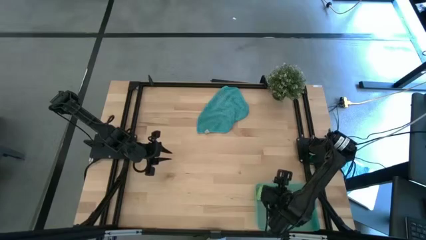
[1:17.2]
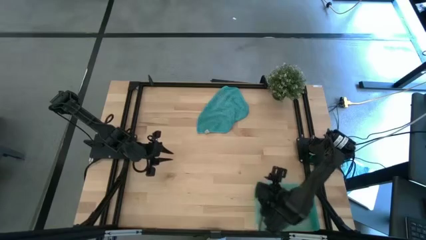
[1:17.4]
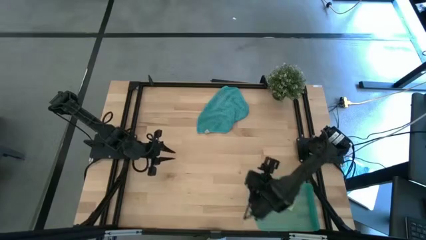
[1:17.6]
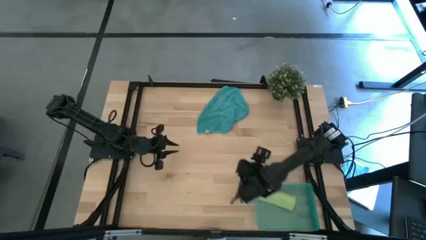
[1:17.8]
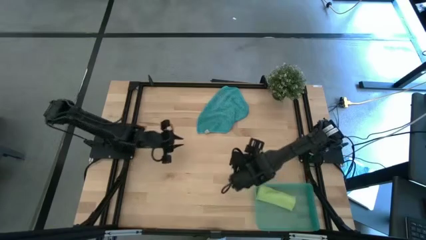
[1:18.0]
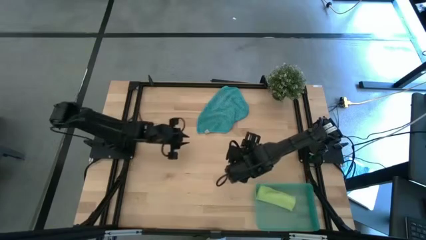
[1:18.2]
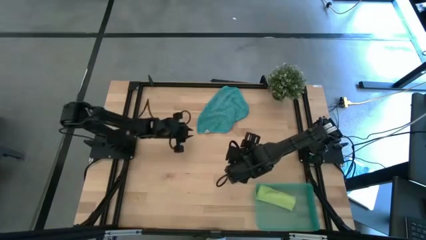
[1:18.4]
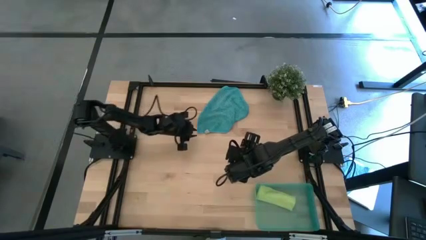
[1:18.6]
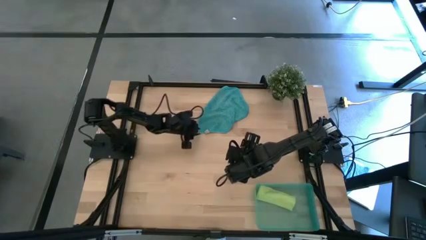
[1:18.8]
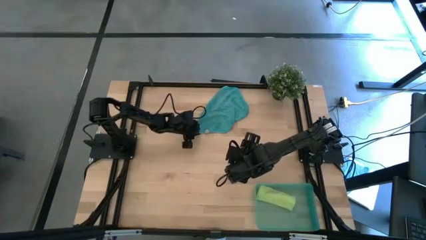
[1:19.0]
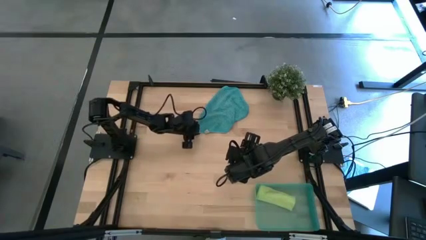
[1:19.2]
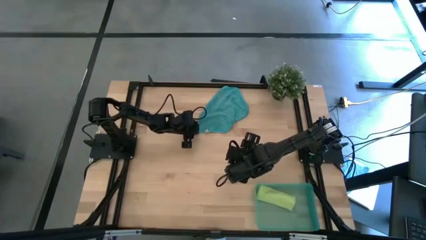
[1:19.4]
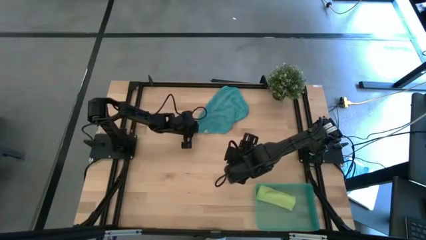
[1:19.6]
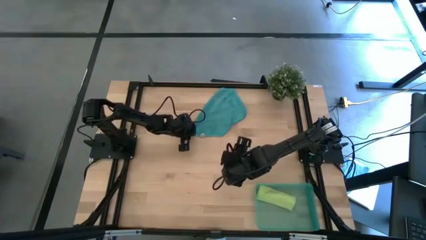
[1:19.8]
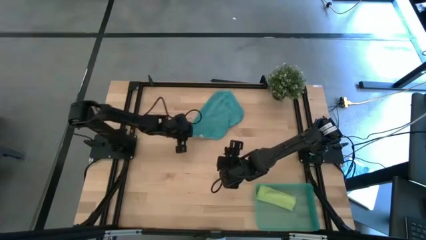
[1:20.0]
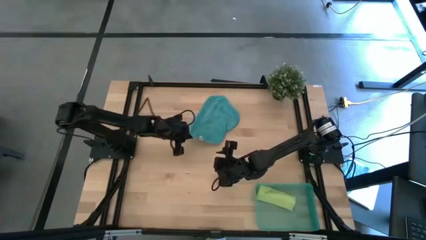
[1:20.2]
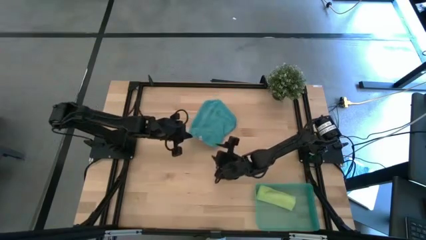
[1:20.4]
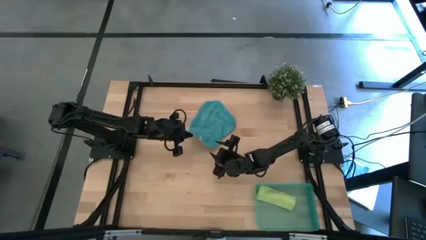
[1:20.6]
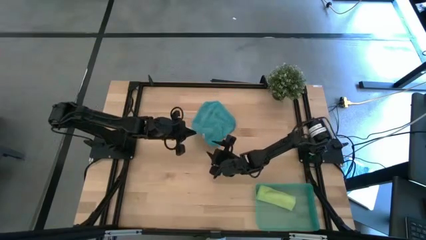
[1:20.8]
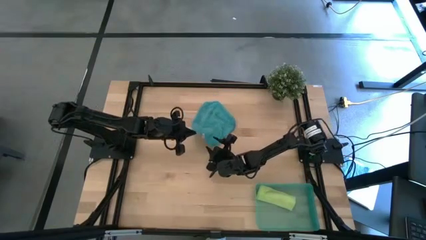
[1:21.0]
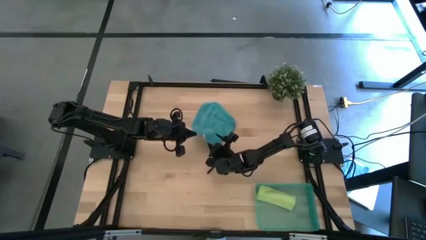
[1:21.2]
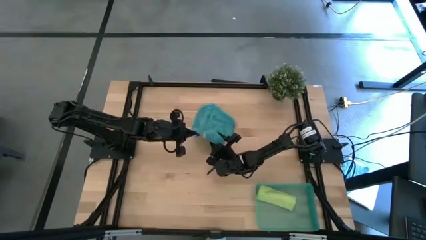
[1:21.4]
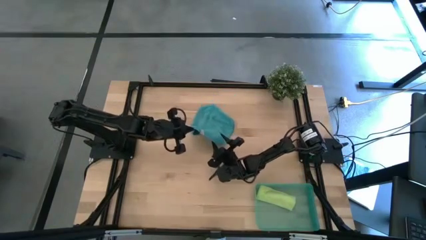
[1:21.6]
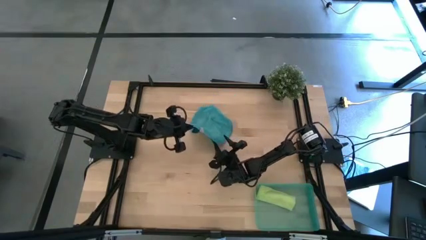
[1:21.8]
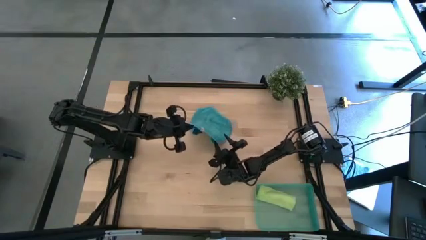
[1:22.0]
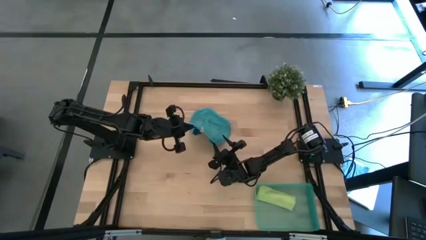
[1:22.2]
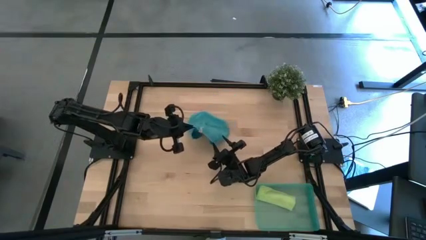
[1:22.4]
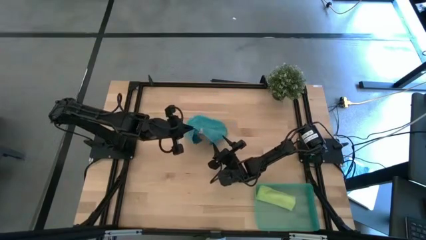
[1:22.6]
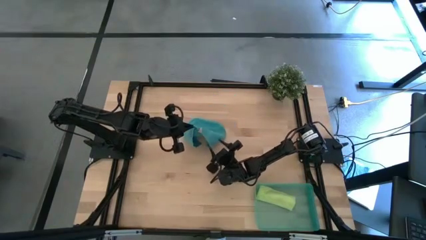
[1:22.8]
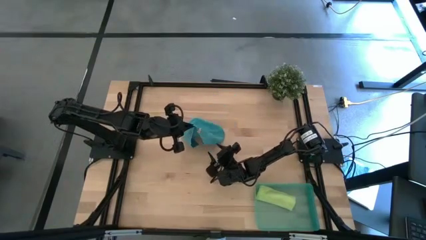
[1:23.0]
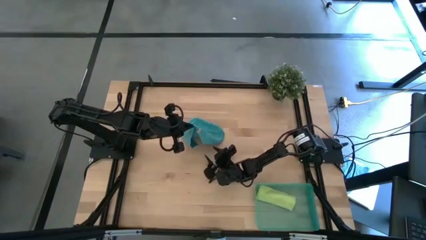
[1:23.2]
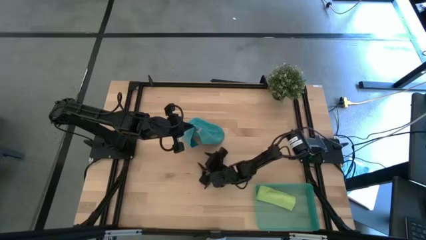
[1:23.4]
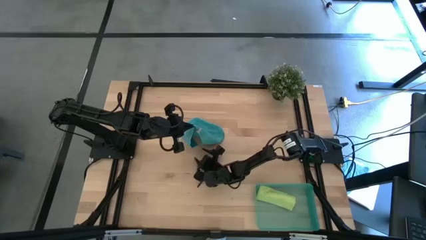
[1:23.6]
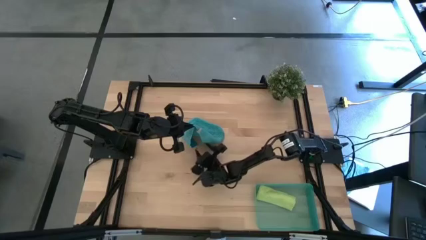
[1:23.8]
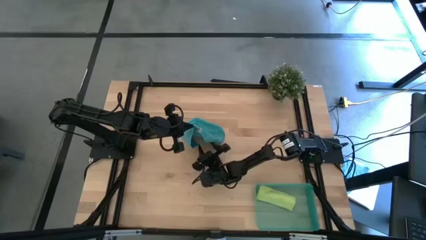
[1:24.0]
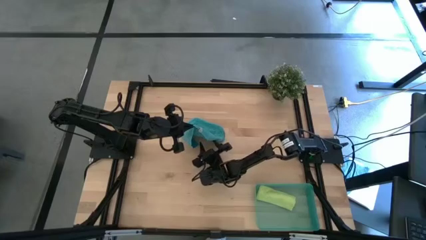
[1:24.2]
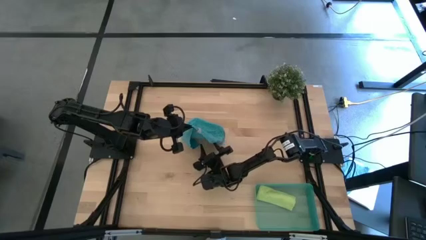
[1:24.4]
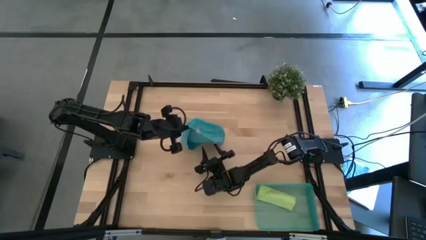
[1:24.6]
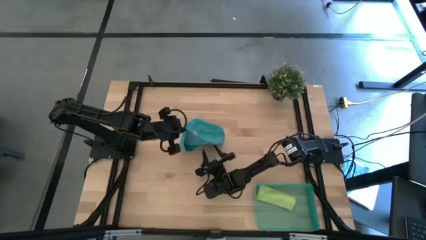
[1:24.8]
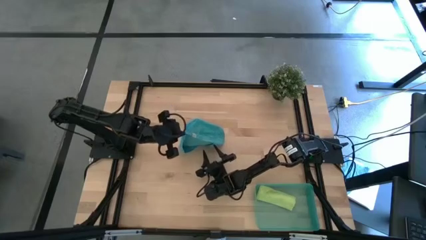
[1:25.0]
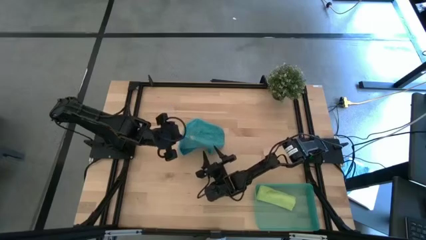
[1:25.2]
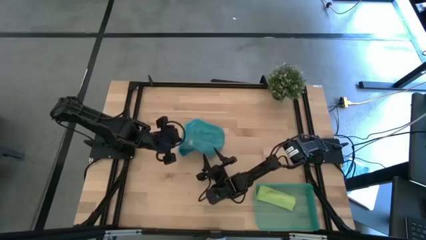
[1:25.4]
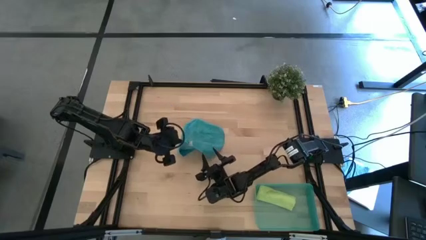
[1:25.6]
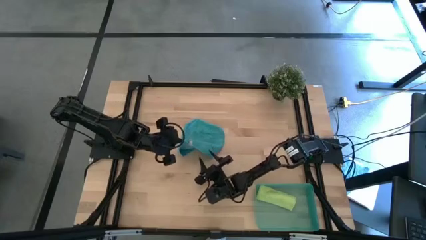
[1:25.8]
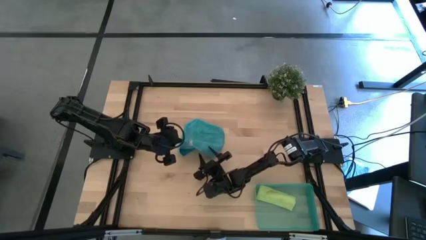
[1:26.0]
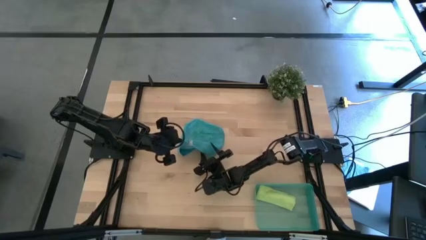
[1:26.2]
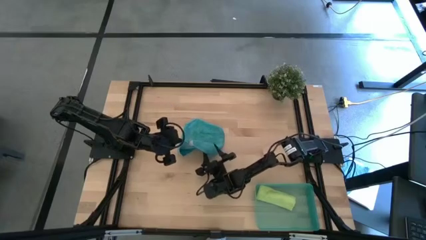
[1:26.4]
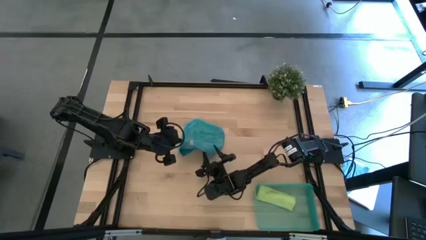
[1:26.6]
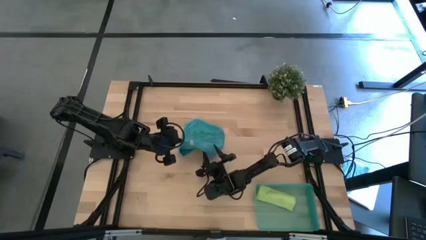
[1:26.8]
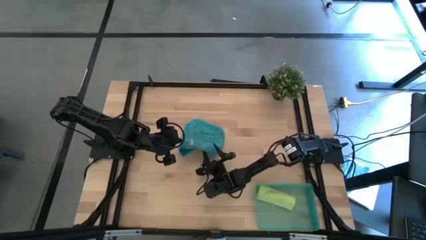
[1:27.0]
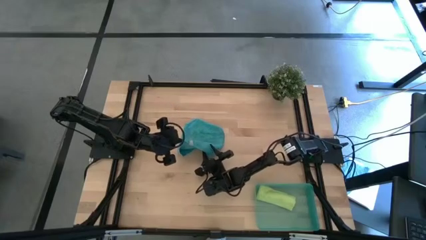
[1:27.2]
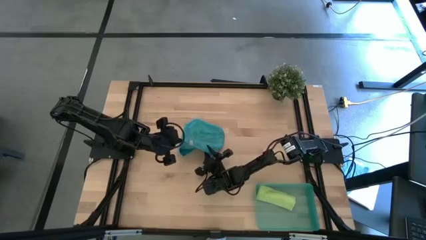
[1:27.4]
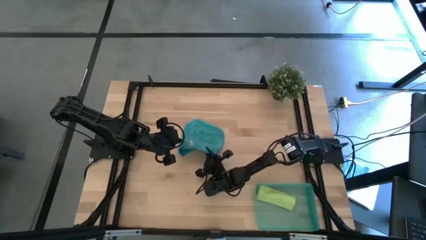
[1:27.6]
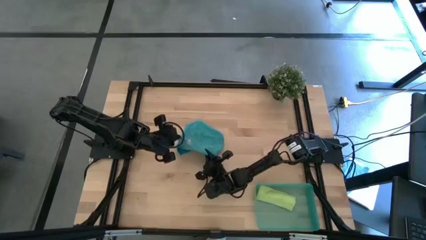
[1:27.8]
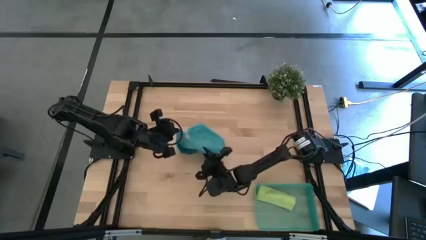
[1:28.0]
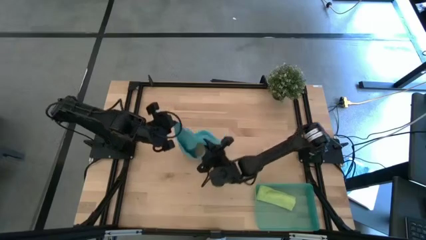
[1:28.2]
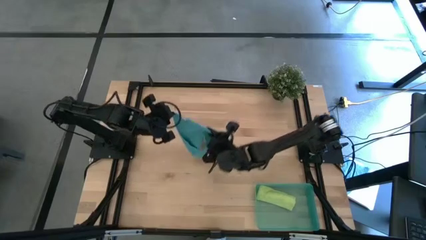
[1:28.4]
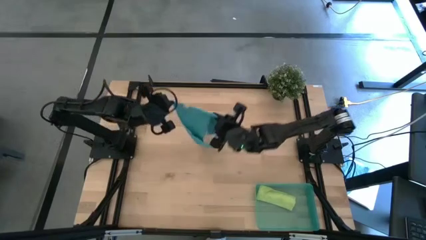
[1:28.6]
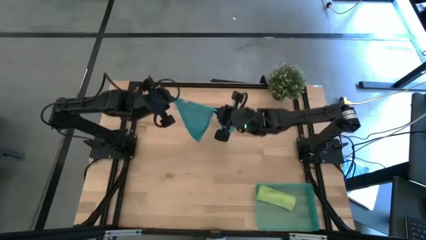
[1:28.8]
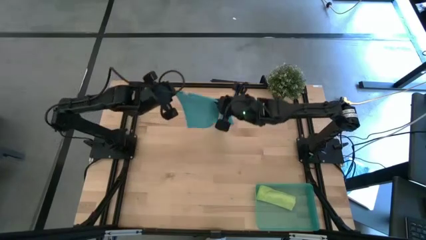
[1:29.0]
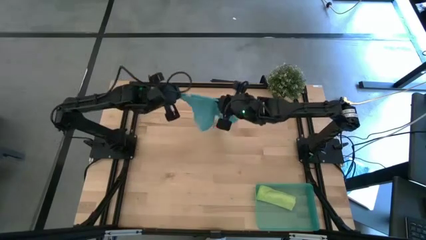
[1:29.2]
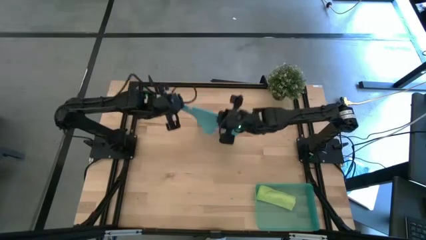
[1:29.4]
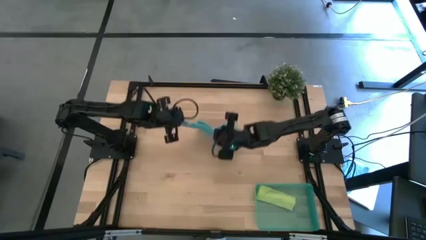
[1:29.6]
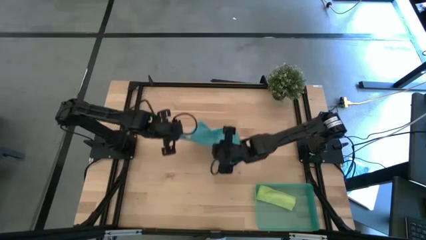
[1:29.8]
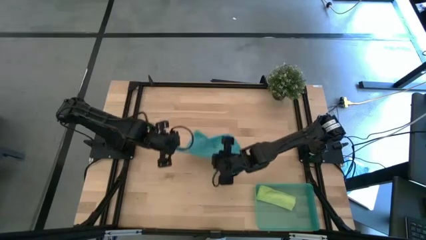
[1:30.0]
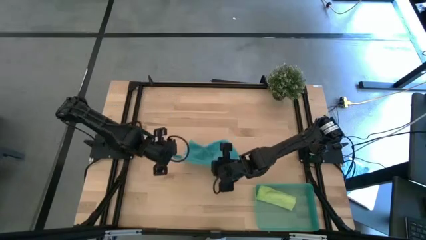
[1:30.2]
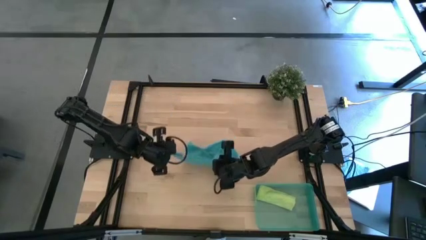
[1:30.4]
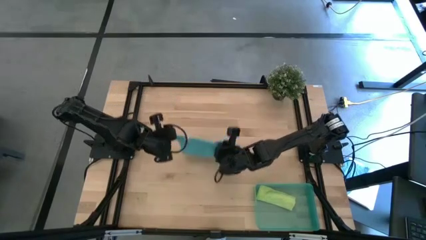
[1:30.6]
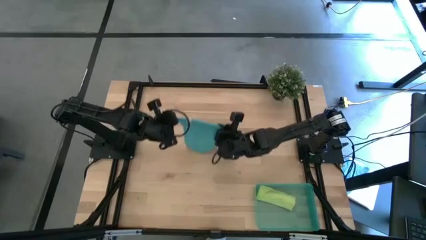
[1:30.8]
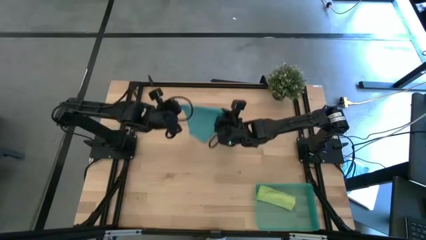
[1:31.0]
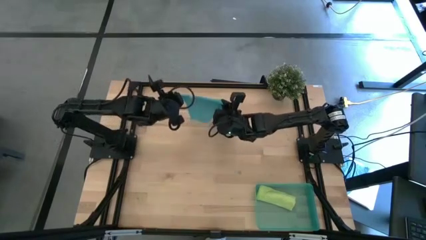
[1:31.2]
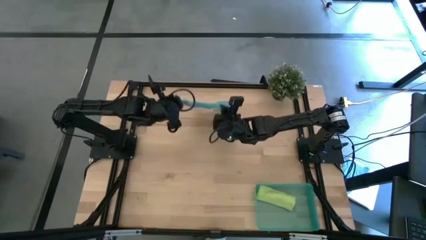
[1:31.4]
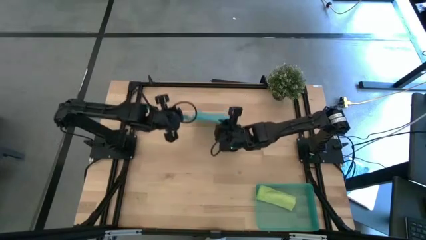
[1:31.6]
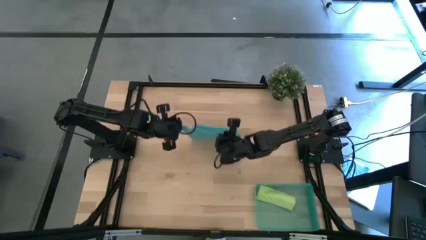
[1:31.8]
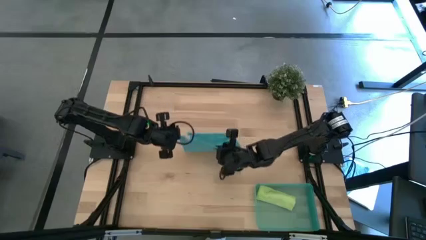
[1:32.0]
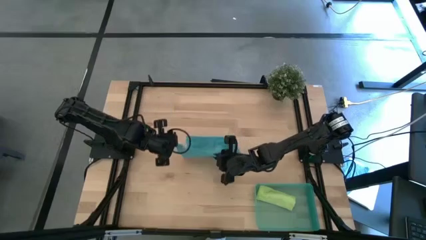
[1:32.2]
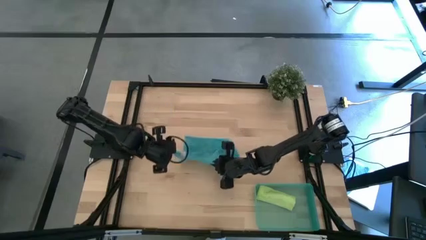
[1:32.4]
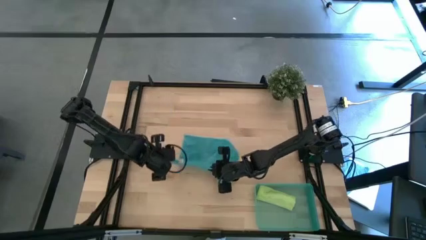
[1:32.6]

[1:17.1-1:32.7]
Task: Roll microfiber towels into tight, uniform cylinder then place into a basket
Fold the blue microfiber cloth
